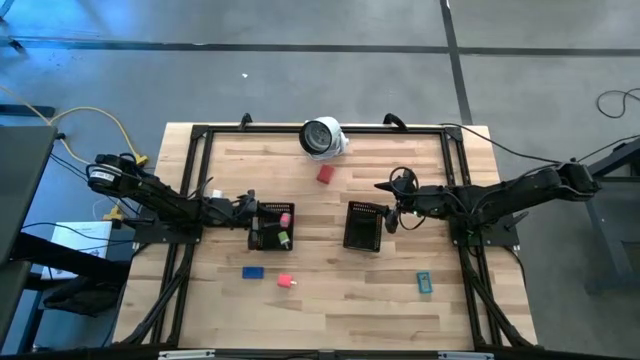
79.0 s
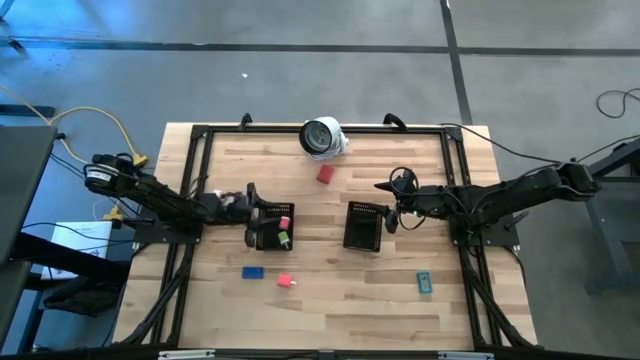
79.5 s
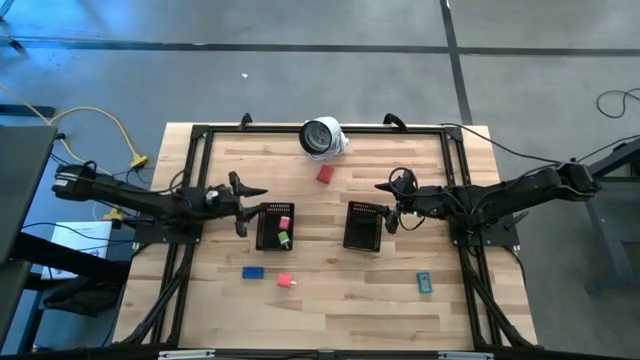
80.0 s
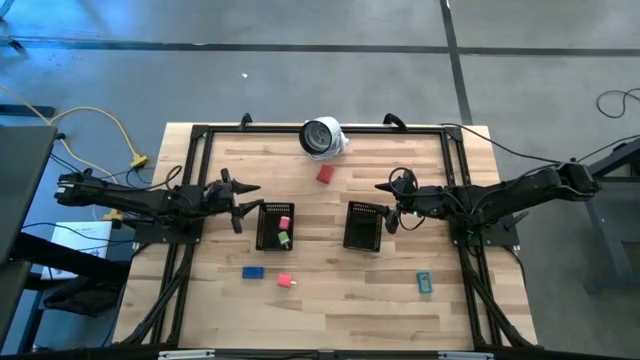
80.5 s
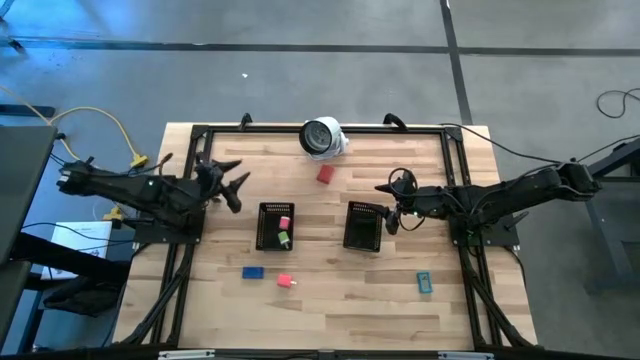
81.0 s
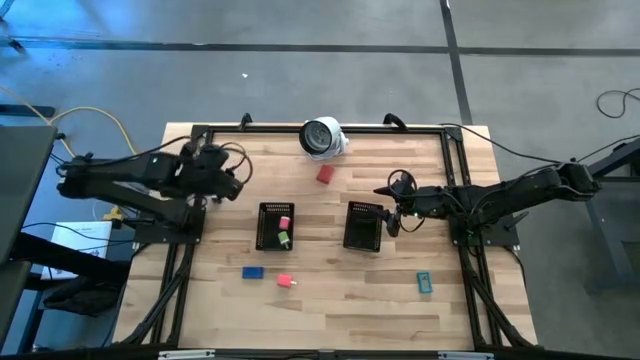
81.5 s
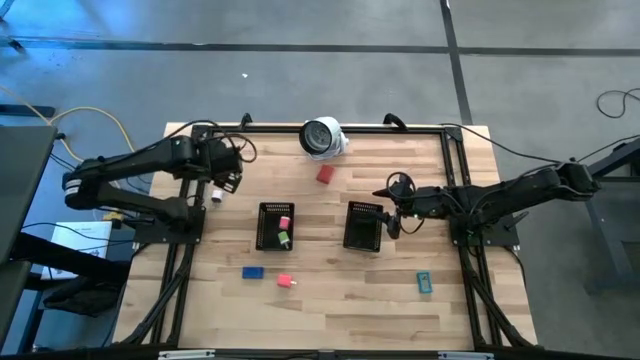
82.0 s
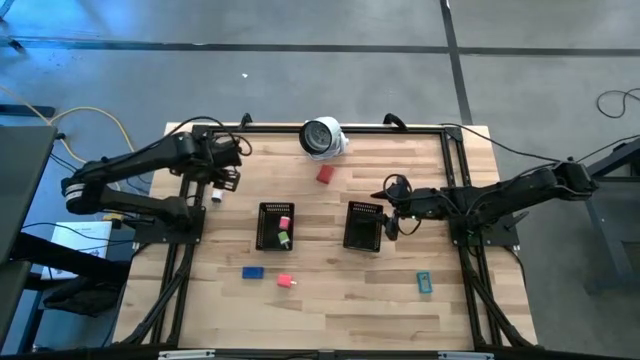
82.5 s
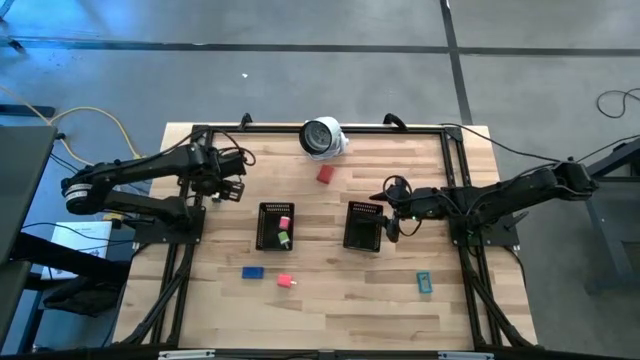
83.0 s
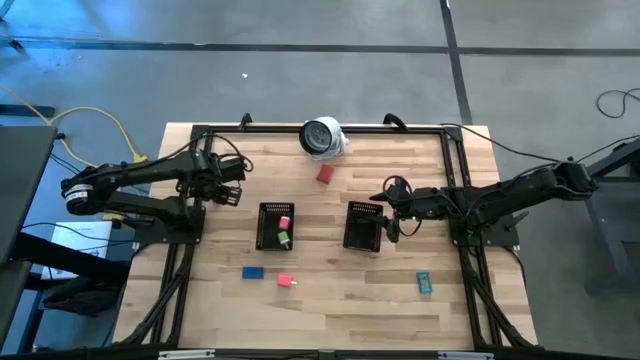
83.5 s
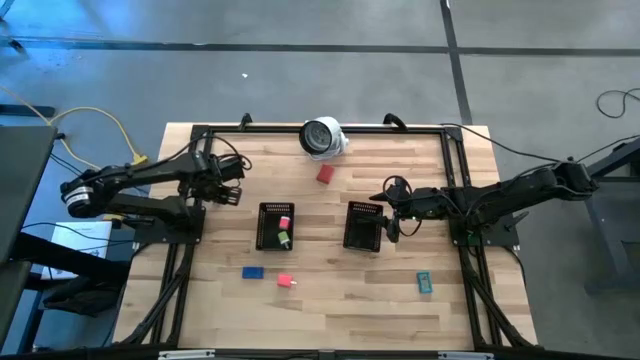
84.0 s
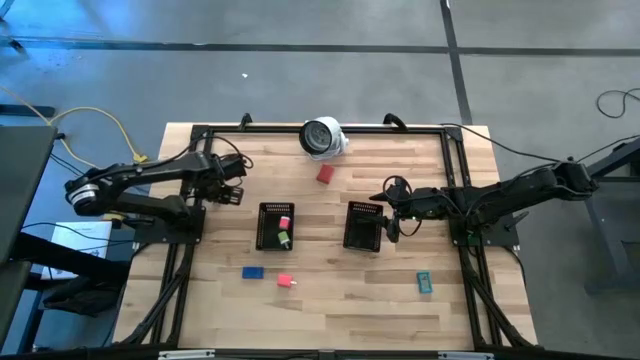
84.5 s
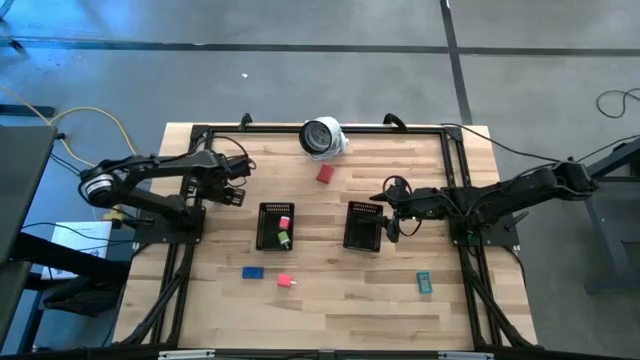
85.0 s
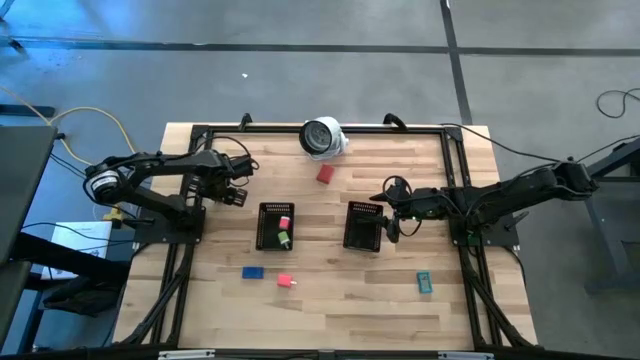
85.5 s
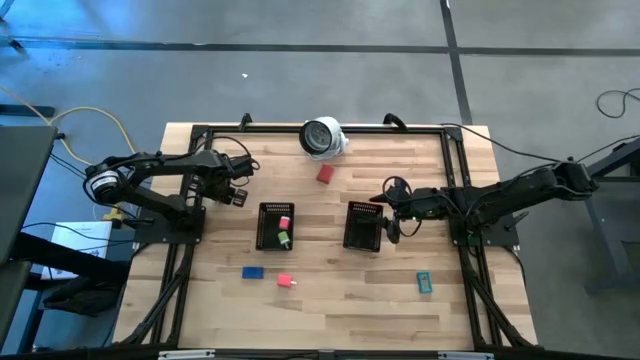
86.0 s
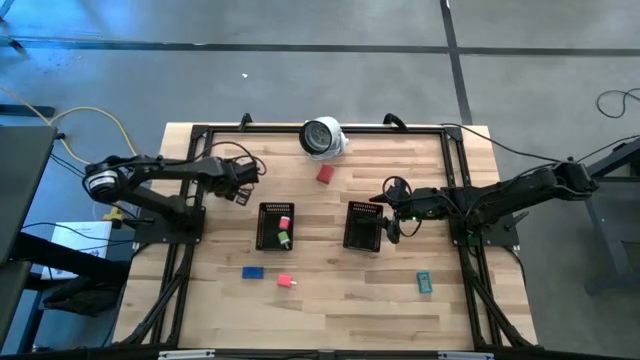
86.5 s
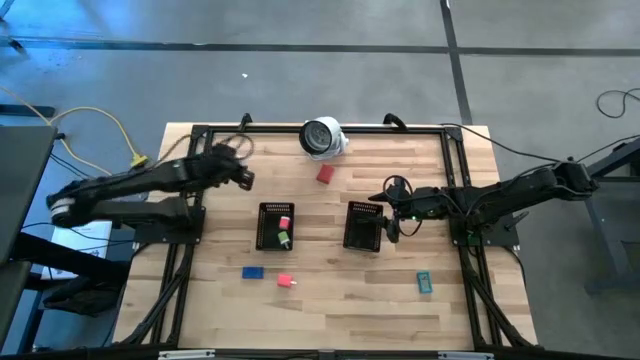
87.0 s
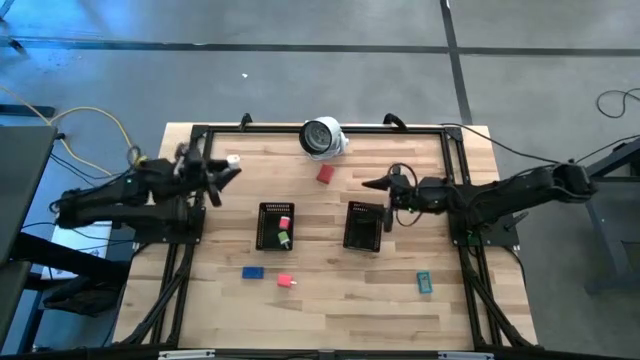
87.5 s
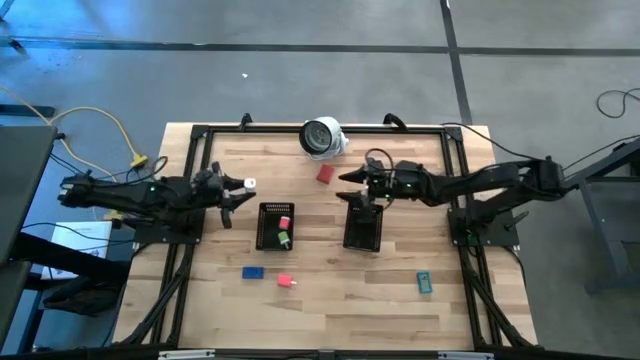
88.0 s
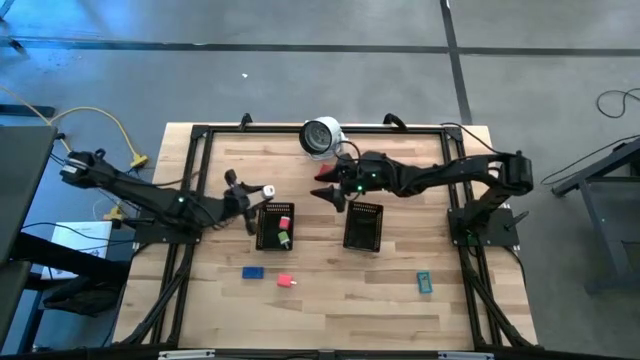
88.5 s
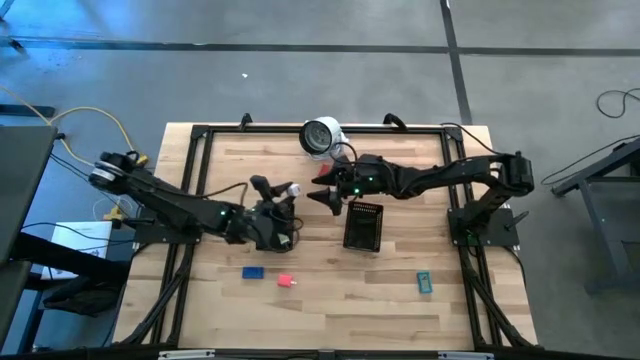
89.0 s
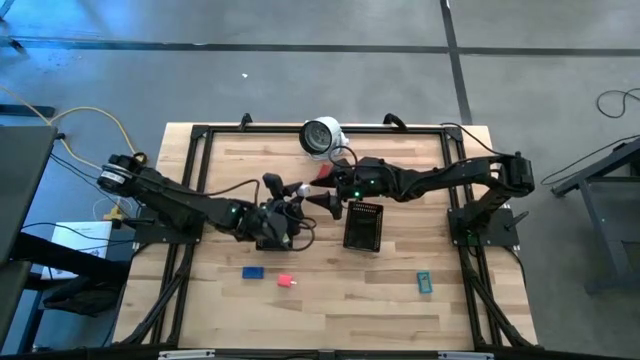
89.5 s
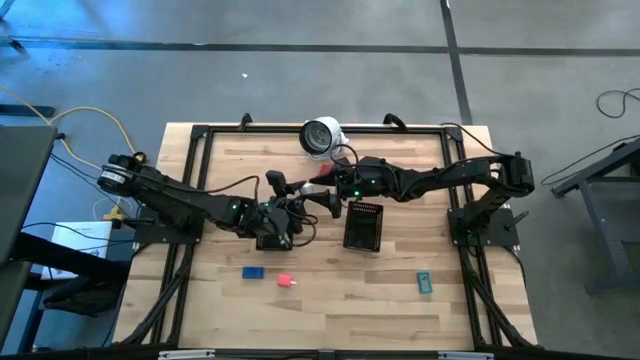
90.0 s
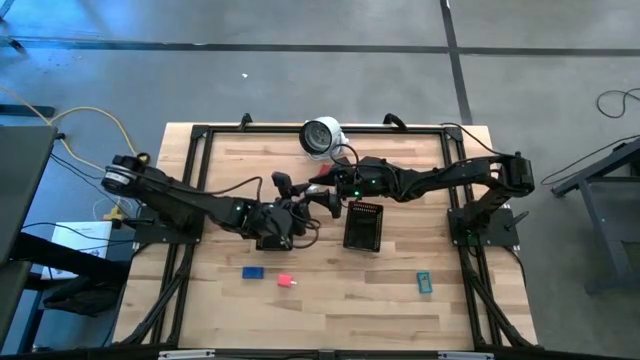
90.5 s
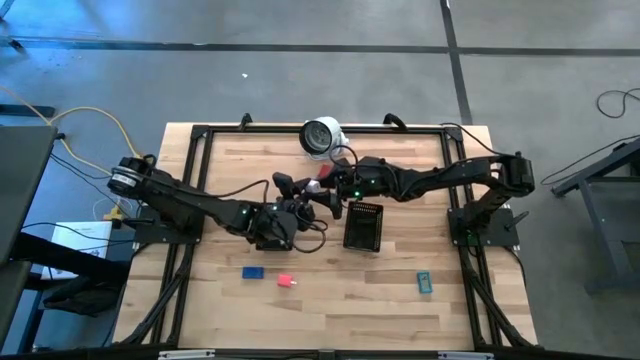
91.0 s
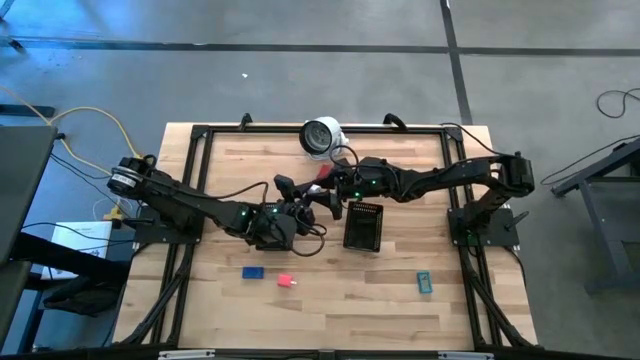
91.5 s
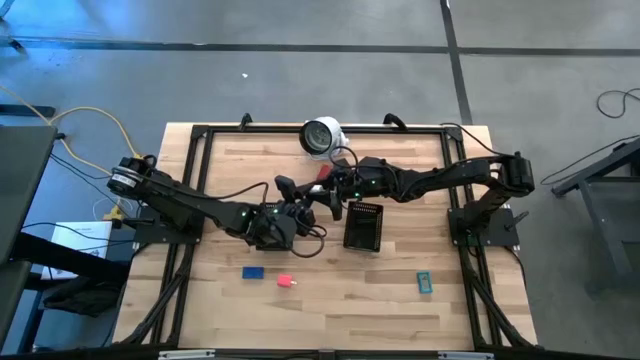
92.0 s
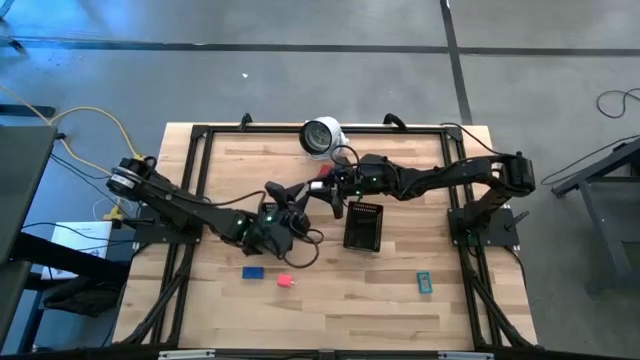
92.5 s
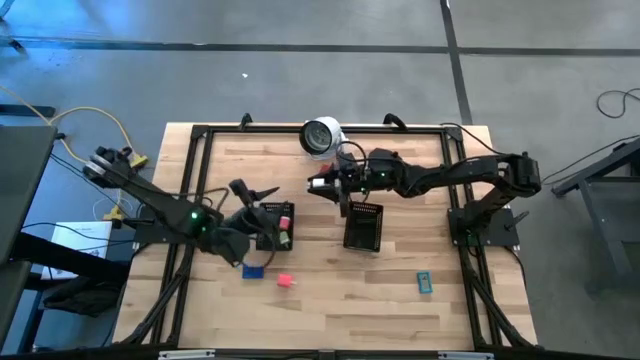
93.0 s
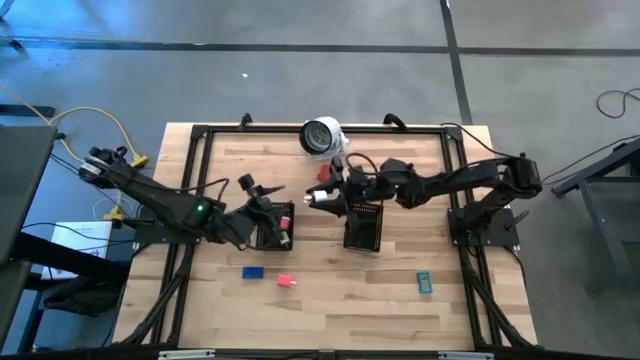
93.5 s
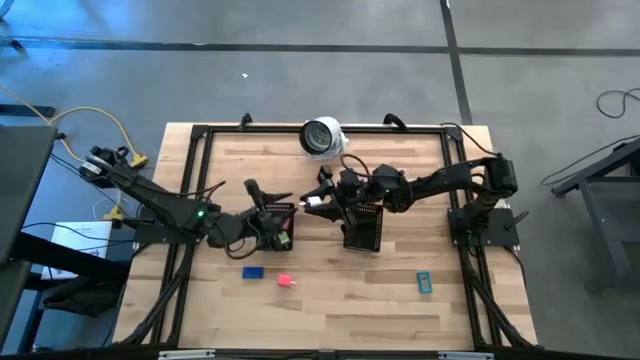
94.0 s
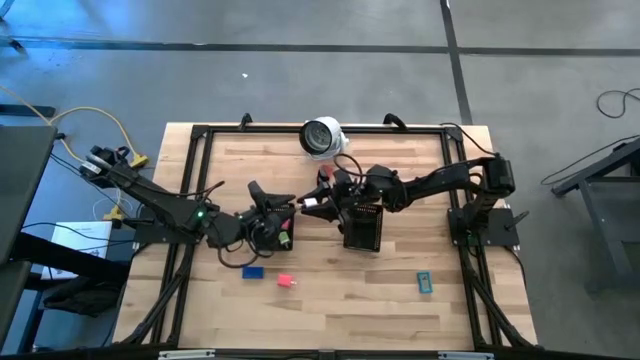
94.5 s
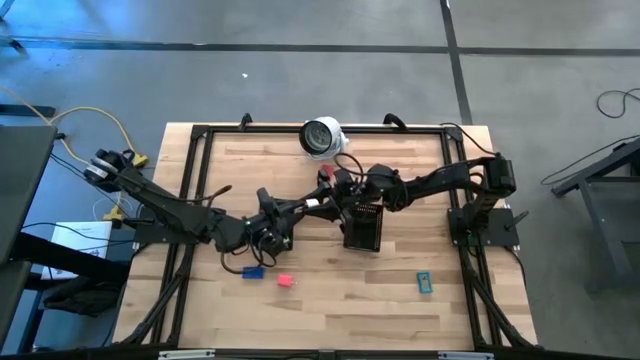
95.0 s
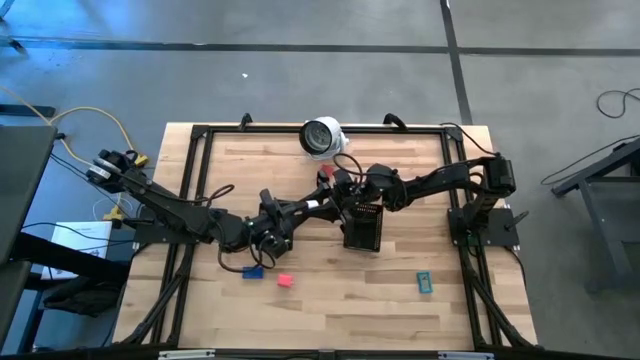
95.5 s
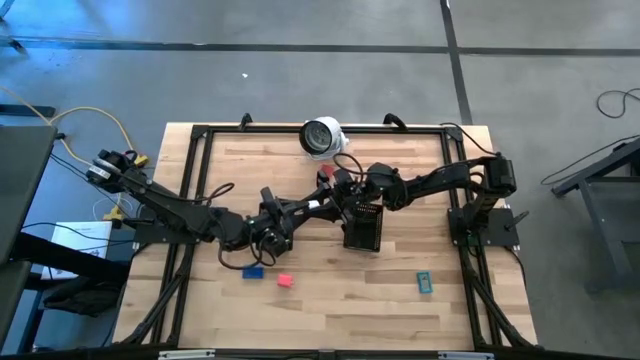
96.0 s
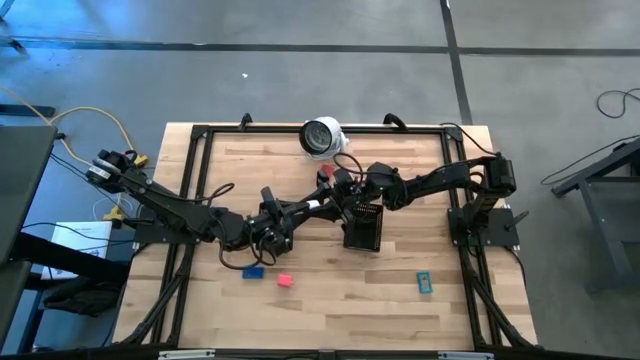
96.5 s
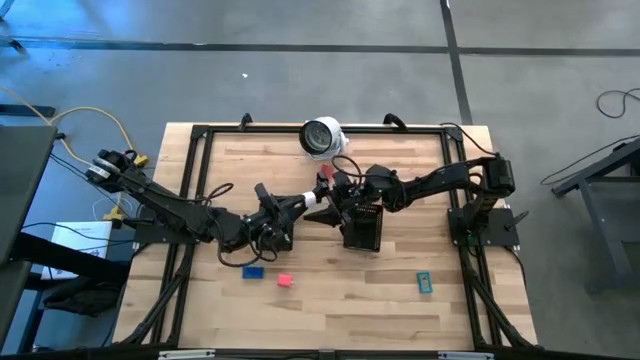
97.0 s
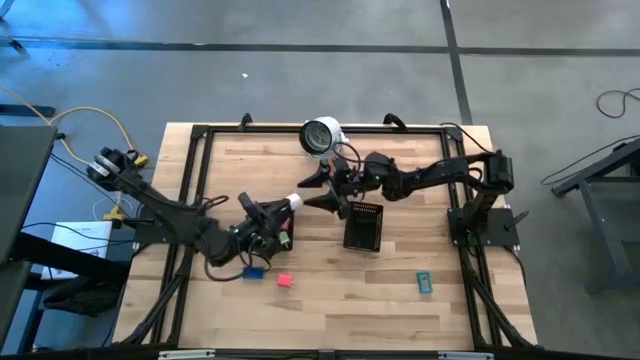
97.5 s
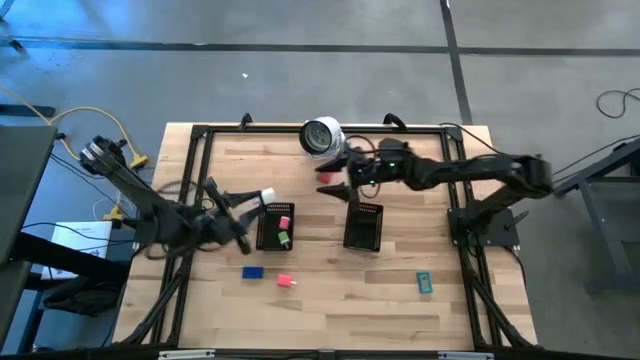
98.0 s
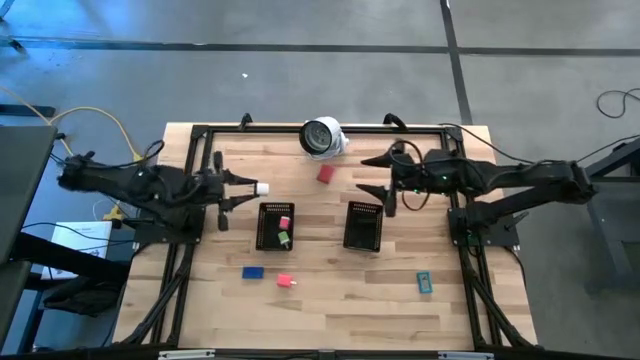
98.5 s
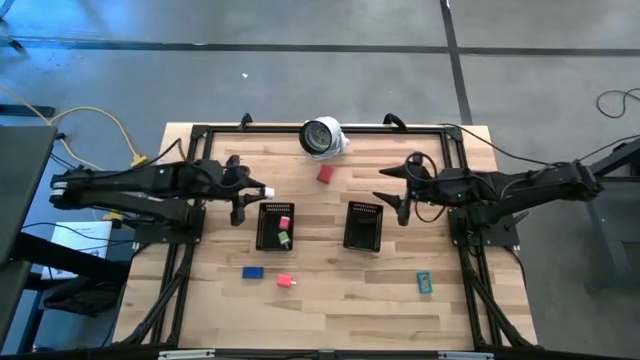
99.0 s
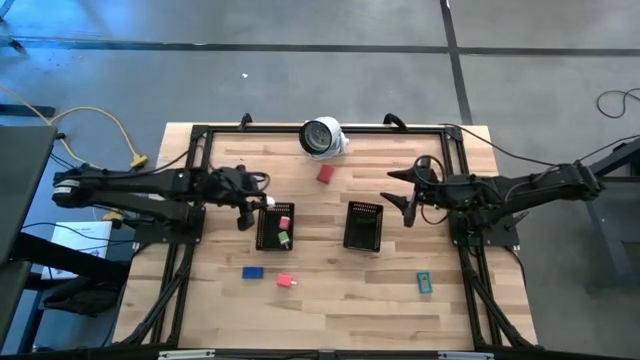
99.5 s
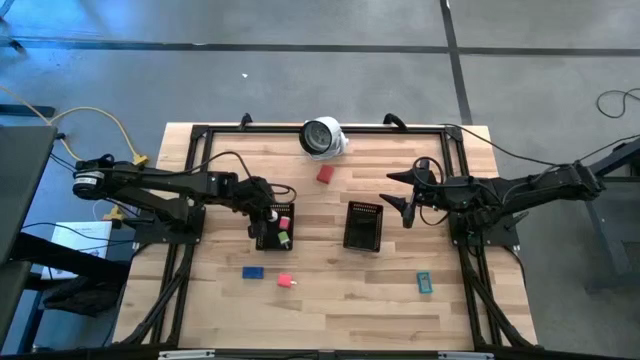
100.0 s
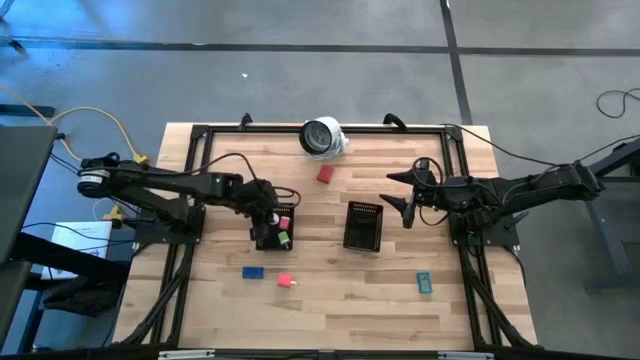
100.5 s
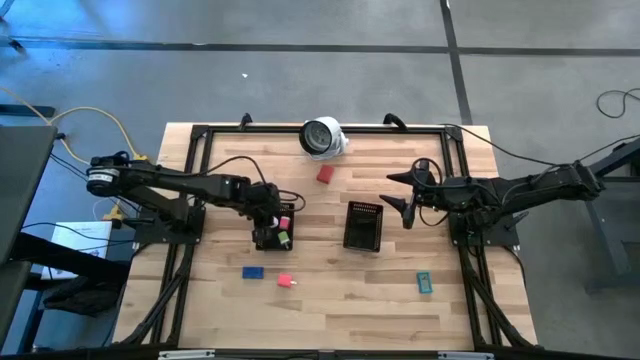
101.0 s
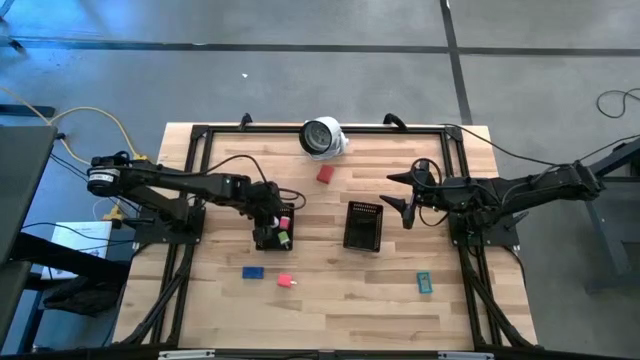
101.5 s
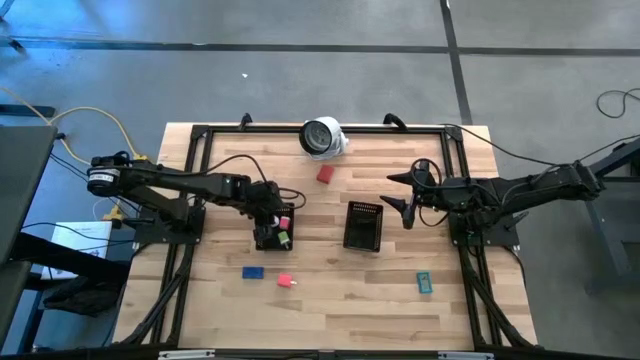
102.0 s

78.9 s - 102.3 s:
Task: Pick & Place Office items
Put the white charger adapter into the left black bin
